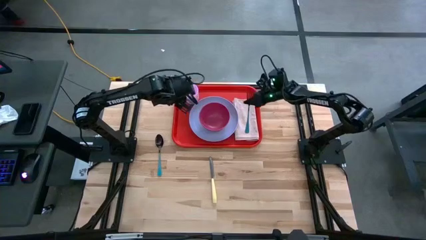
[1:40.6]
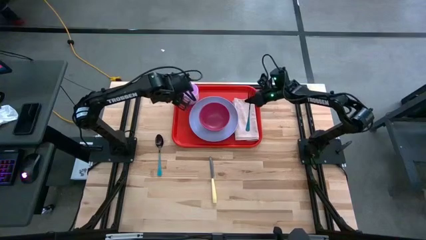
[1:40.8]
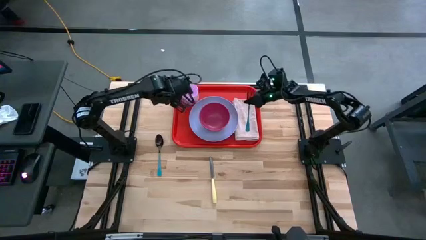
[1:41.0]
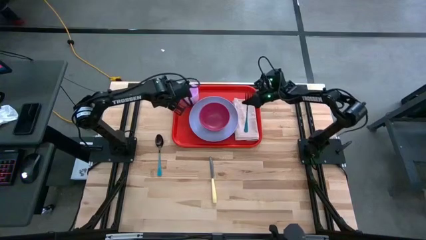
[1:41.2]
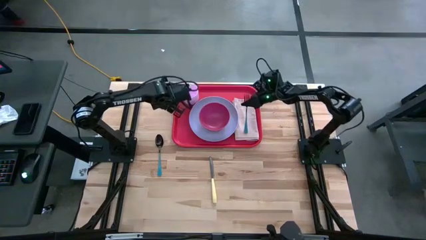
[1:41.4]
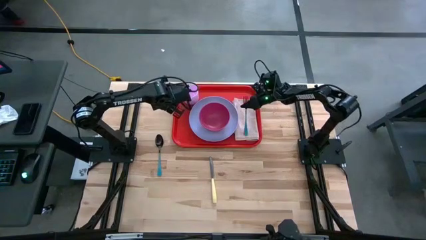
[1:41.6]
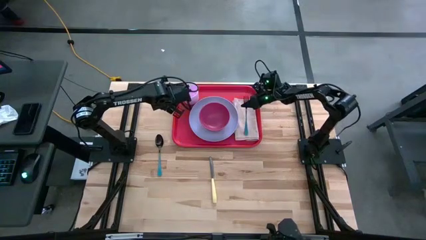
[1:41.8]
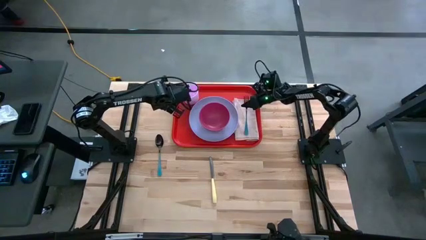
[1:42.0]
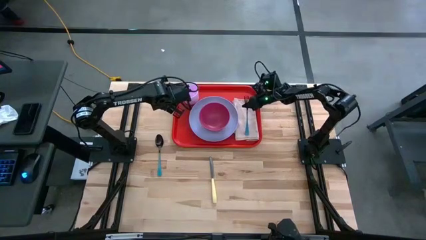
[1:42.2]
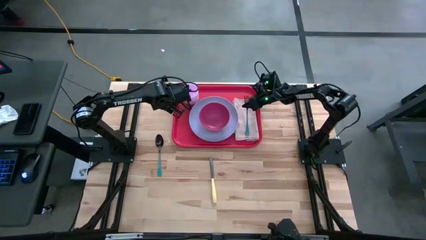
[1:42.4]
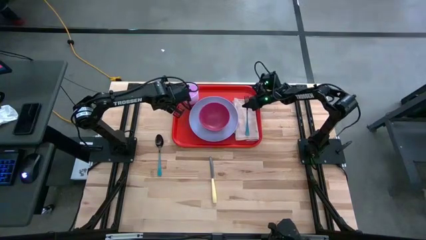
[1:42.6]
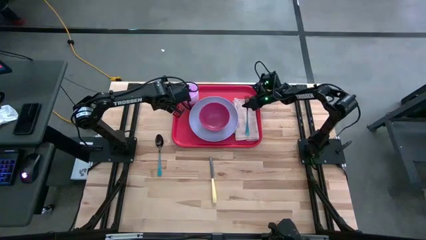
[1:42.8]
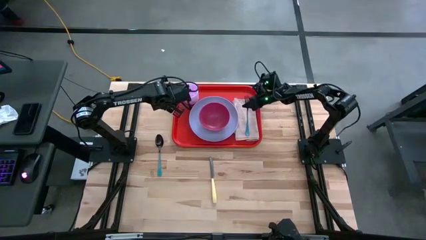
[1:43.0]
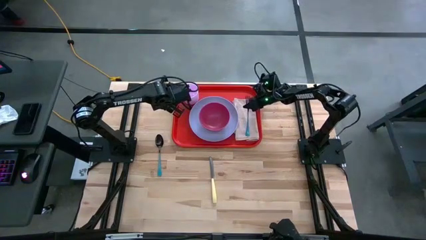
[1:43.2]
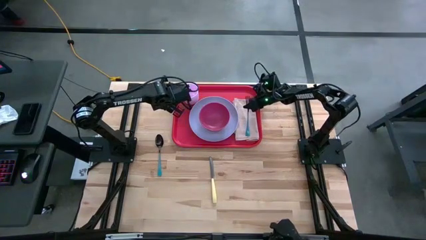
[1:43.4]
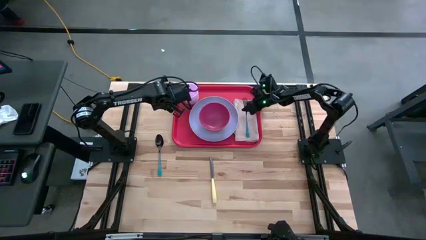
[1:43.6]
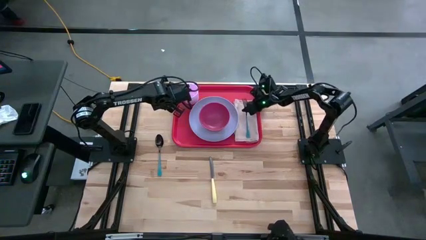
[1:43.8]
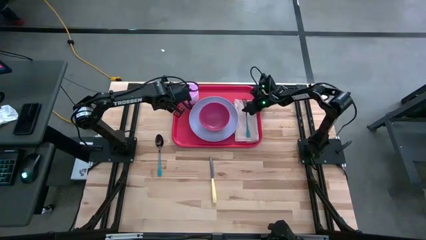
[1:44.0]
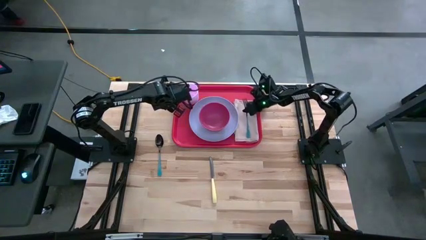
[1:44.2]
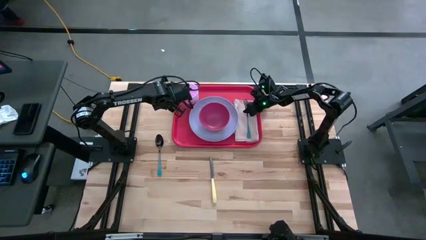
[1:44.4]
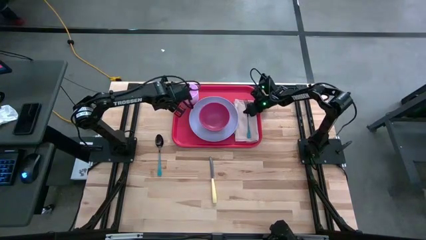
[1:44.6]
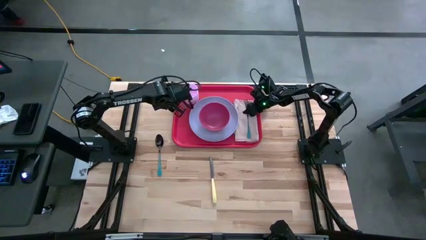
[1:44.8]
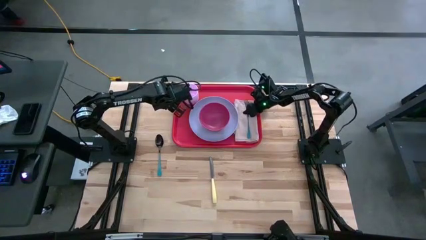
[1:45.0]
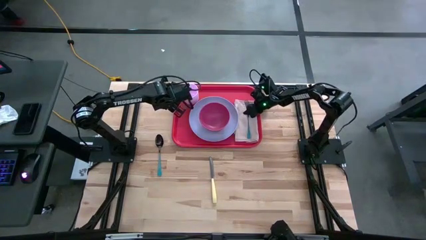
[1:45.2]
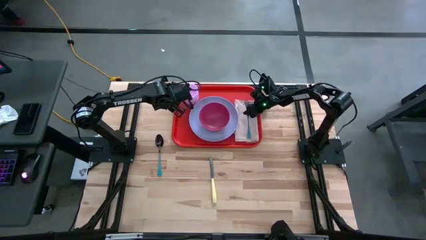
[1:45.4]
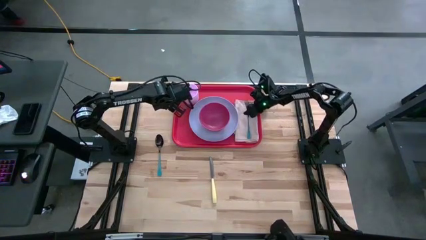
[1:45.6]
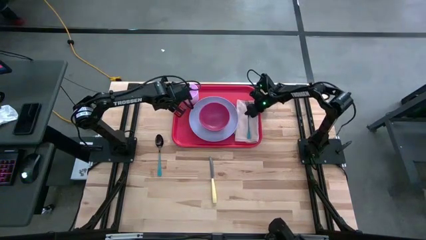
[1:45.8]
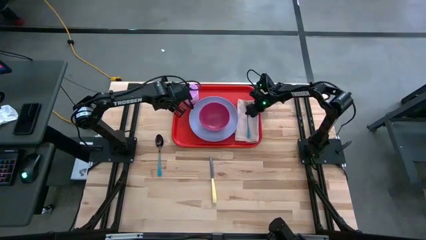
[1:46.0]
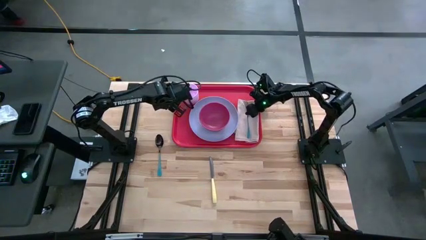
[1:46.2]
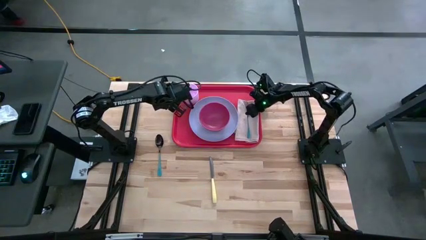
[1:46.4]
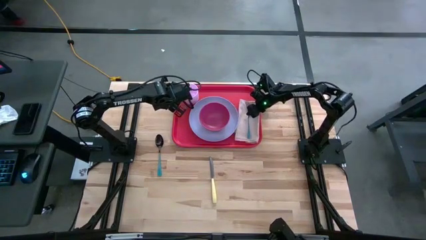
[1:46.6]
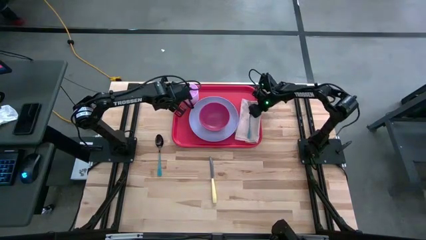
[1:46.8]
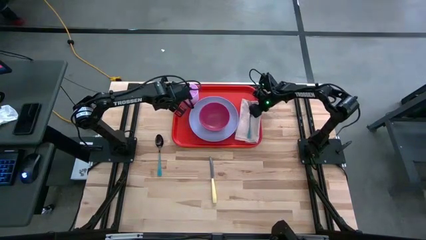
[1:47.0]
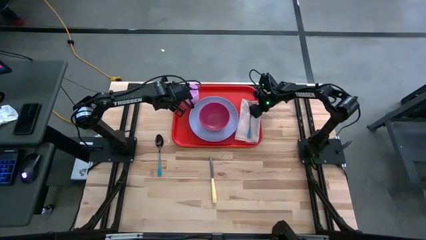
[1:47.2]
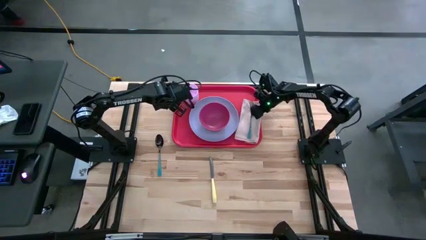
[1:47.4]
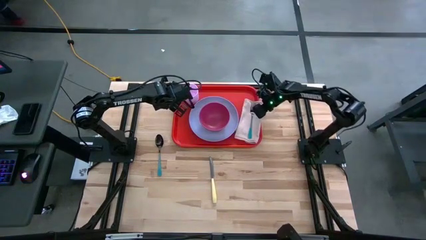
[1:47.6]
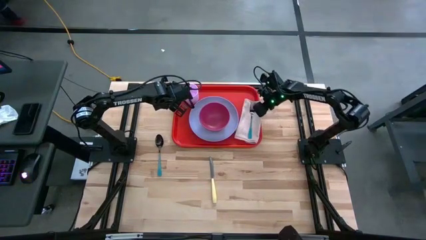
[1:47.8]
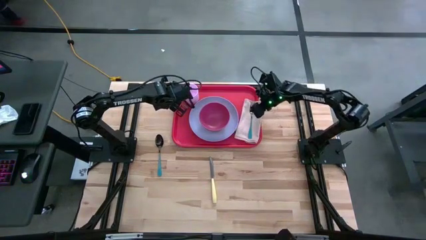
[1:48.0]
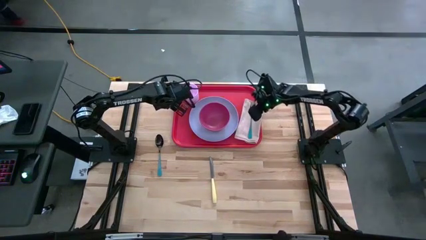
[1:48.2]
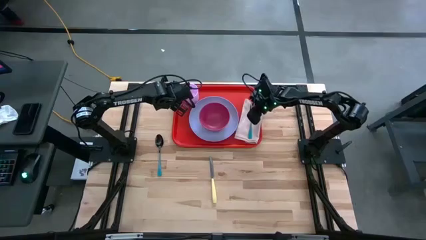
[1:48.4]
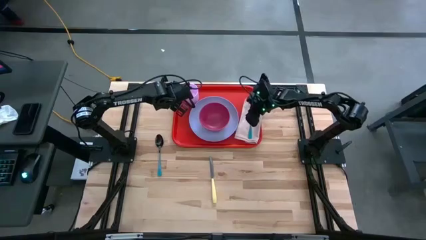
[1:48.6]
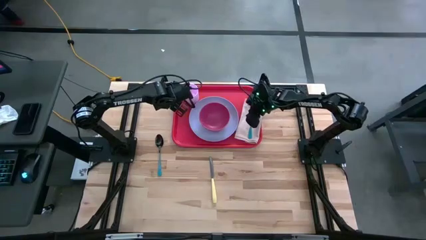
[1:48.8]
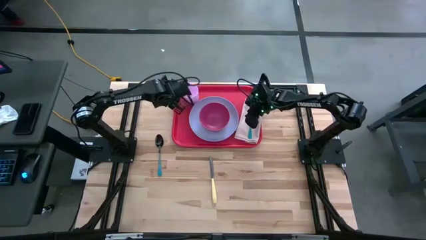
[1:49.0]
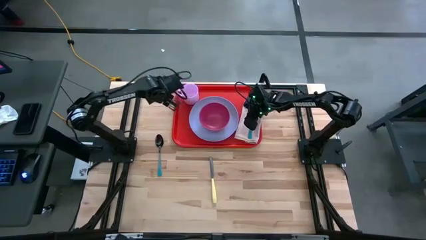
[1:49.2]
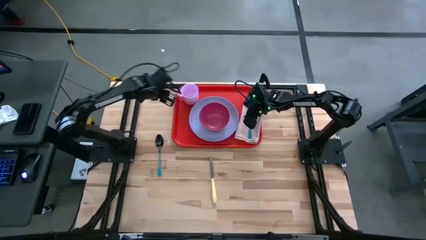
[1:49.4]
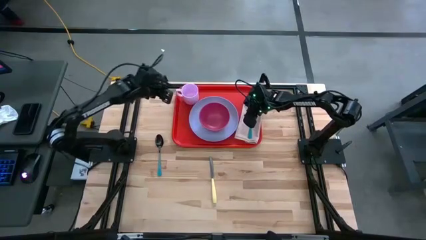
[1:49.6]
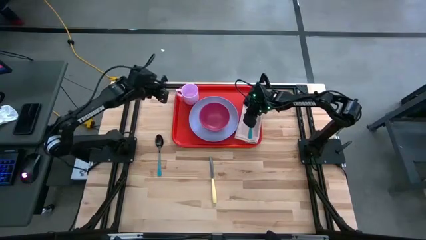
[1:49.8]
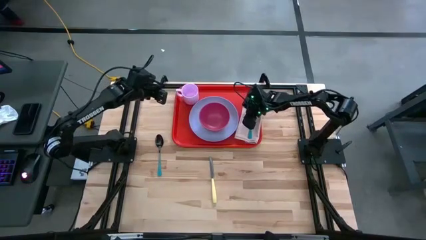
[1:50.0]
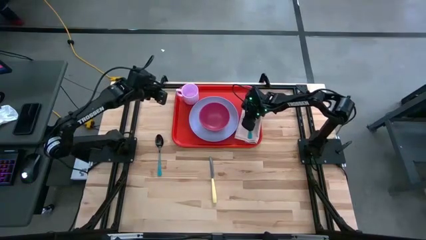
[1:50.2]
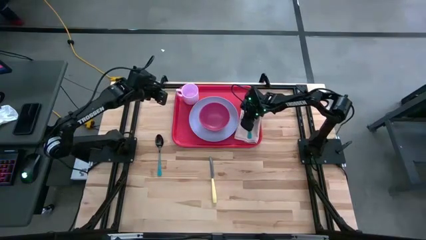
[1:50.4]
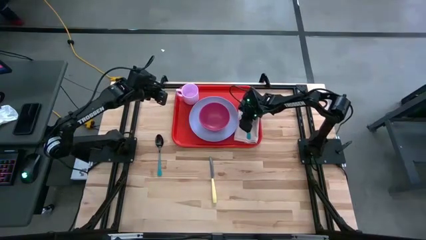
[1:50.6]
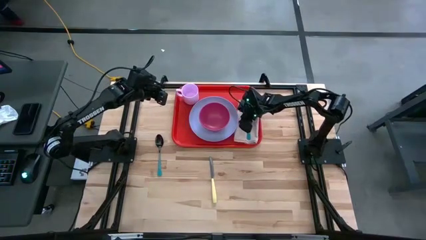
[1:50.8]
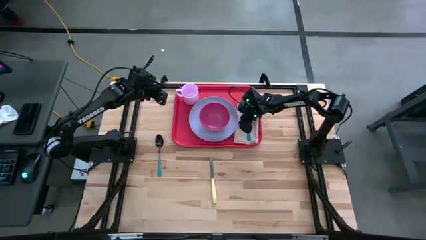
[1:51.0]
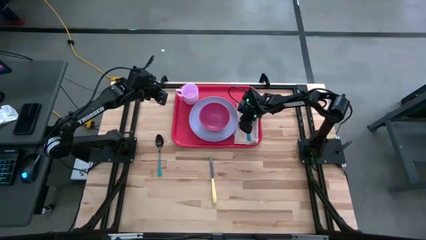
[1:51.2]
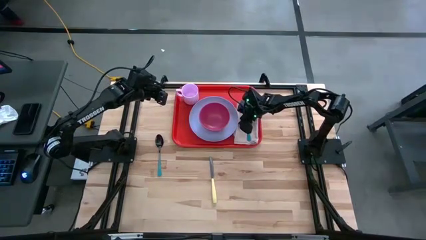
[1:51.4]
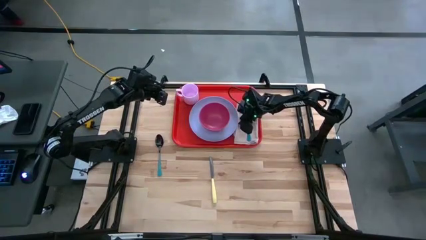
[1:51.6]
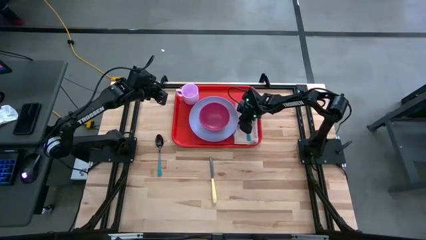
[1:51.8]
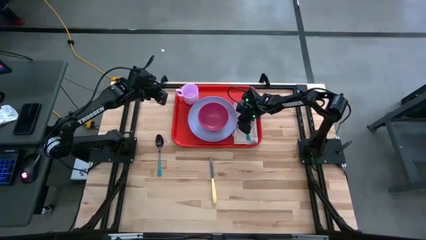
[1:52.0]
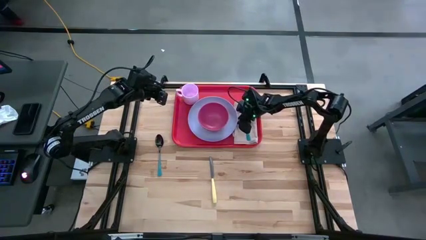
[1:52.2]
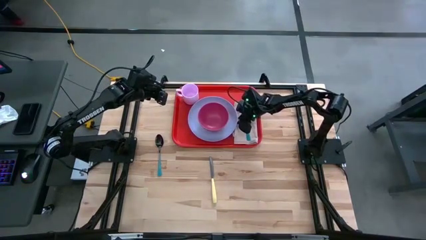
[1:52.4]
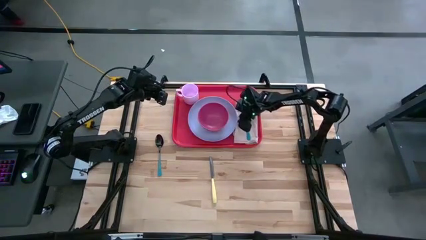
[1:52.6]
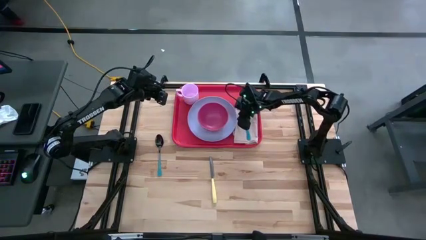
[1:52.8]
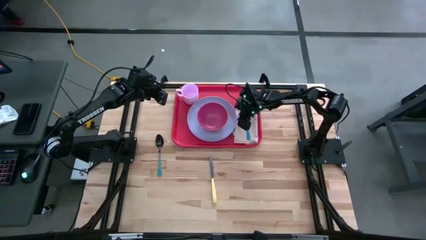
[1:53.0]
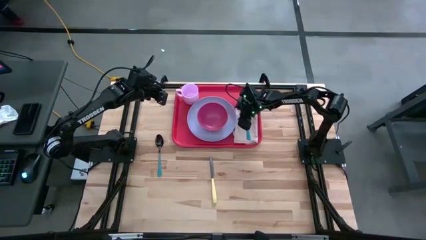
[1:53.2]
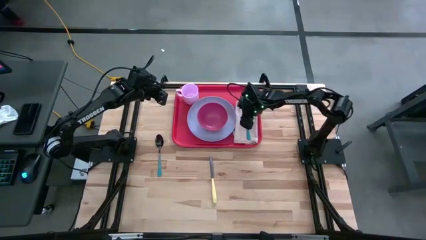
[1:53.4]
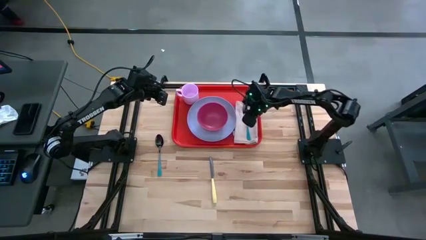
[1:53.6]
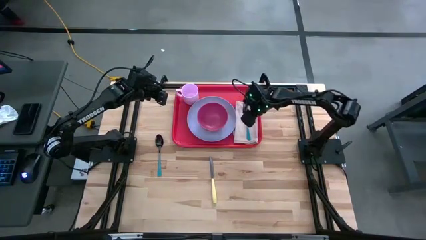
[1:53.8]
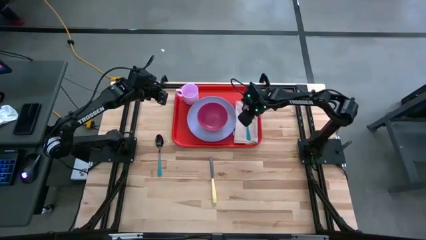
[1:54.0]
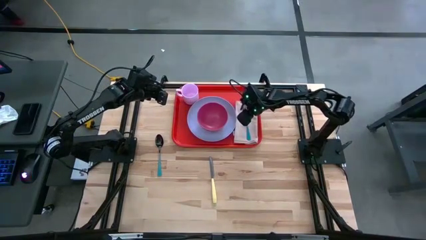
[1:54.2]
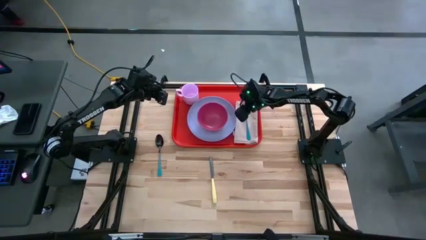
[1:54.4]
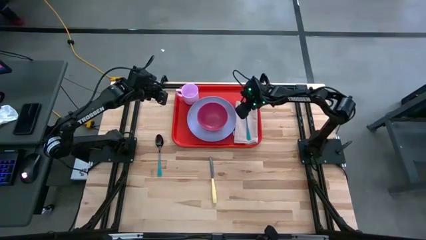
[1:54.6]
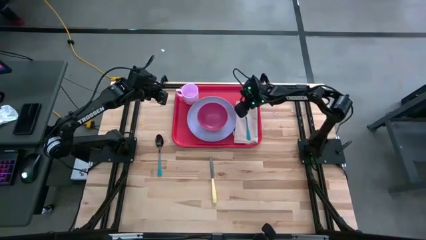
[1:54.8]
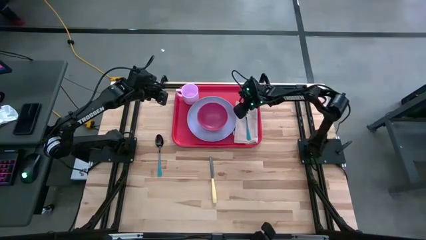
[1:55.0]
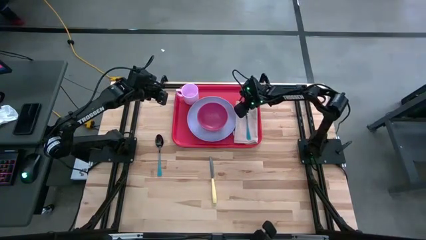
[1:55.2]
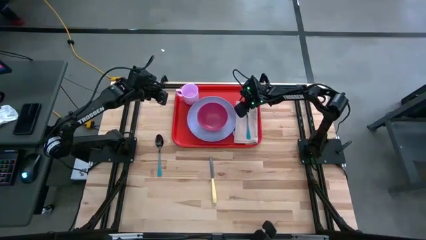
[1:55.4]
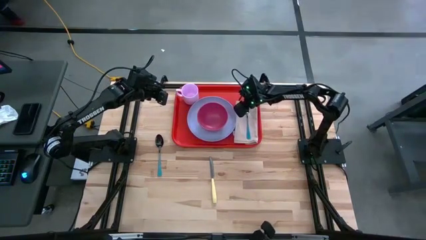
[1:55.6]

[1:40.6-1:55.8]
Task: Set up tray
Put the blue fork on the white napkin
